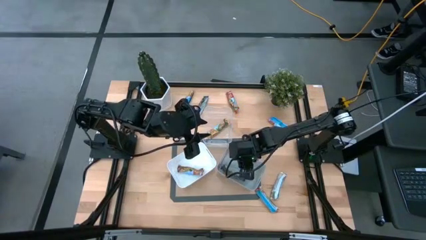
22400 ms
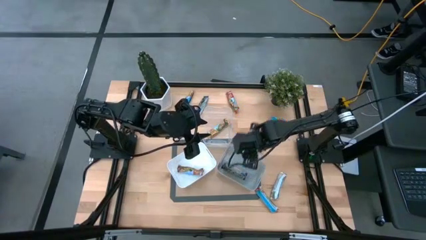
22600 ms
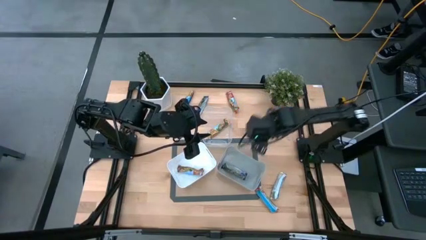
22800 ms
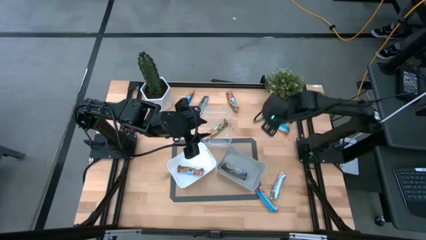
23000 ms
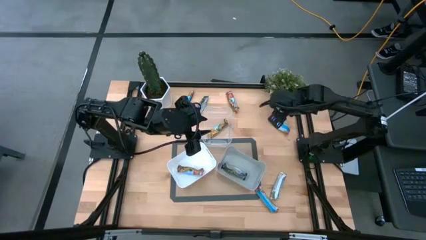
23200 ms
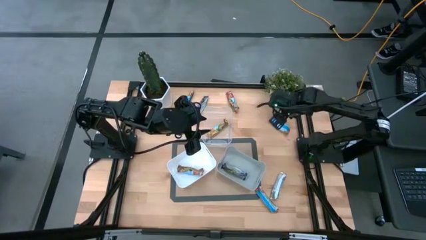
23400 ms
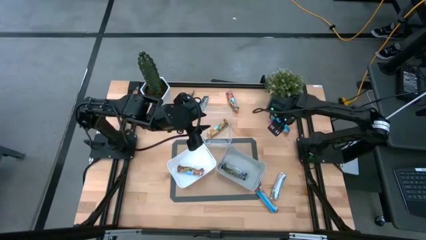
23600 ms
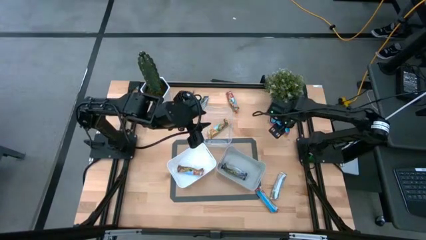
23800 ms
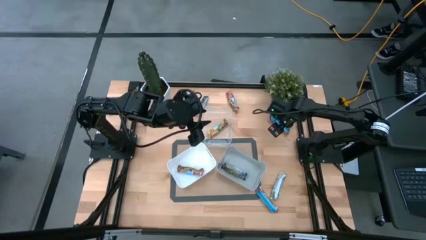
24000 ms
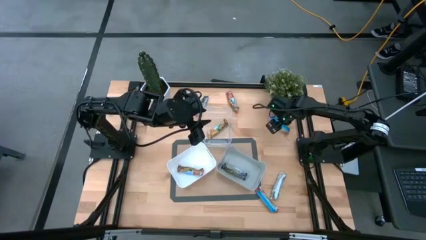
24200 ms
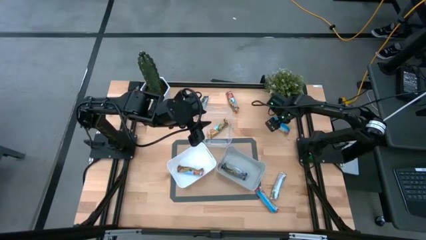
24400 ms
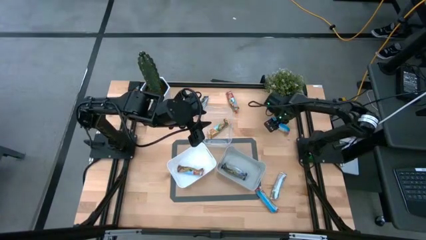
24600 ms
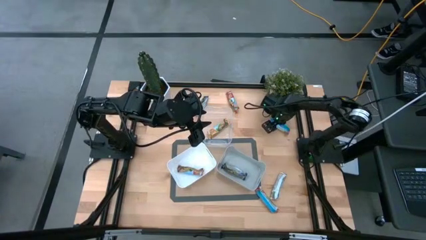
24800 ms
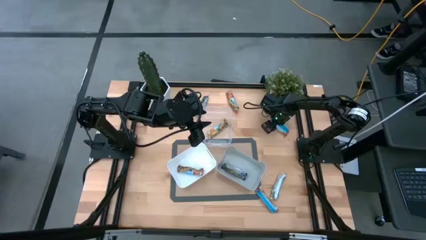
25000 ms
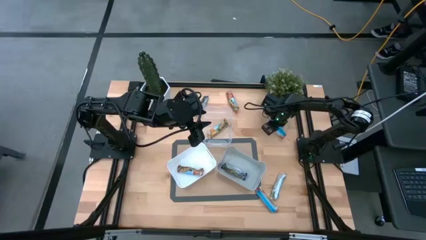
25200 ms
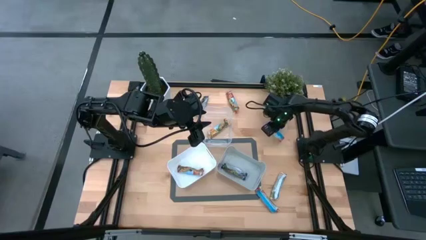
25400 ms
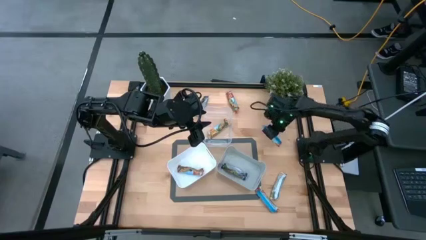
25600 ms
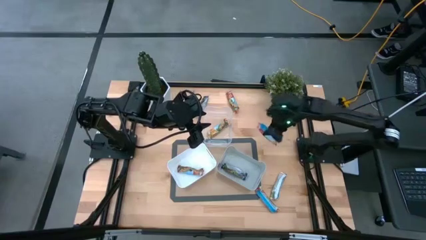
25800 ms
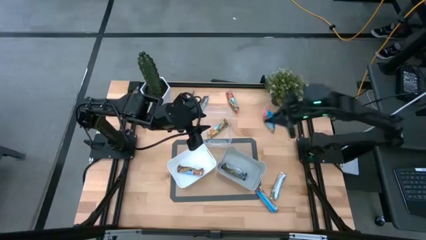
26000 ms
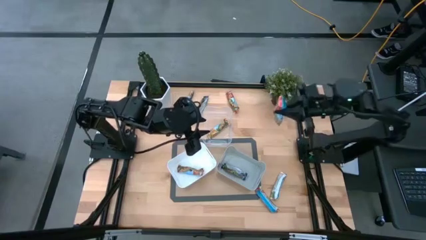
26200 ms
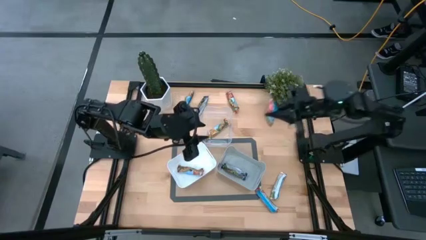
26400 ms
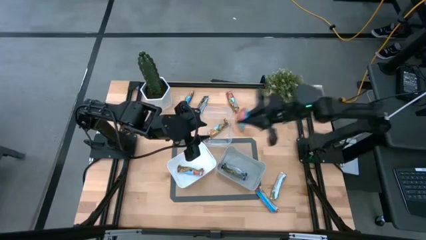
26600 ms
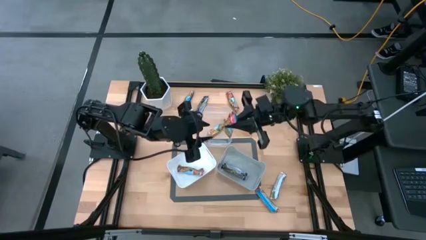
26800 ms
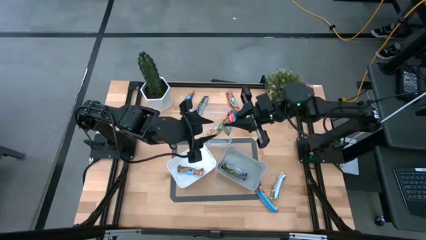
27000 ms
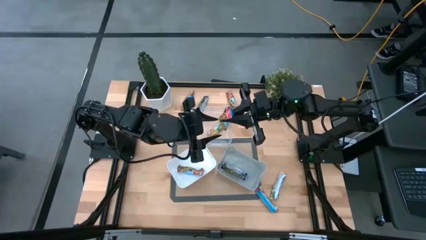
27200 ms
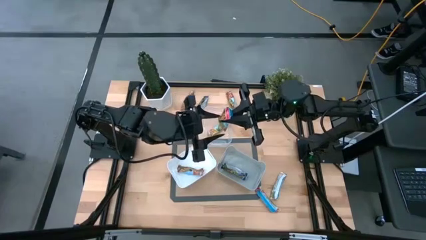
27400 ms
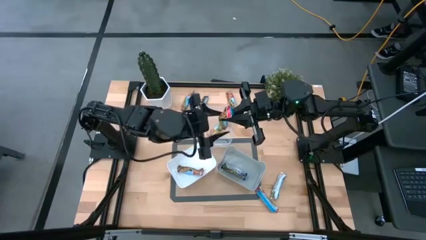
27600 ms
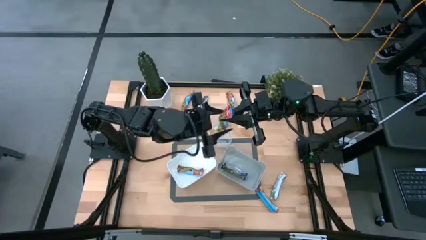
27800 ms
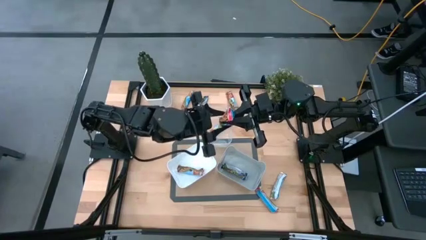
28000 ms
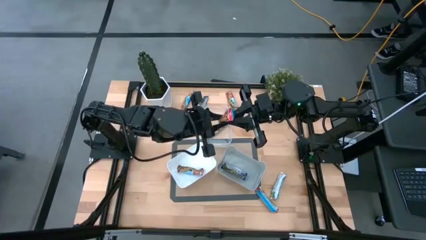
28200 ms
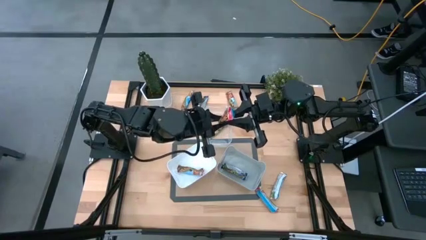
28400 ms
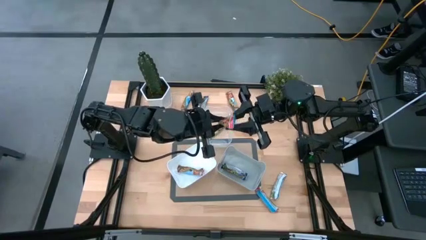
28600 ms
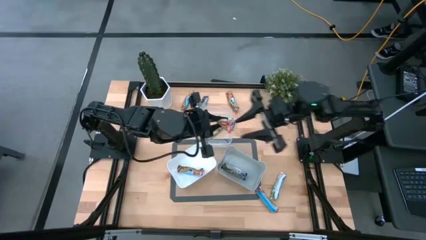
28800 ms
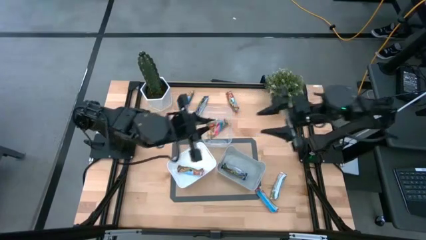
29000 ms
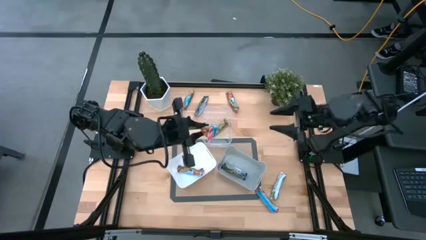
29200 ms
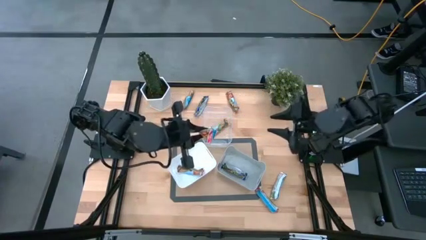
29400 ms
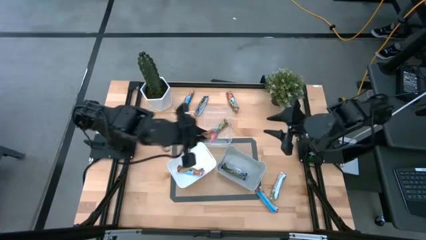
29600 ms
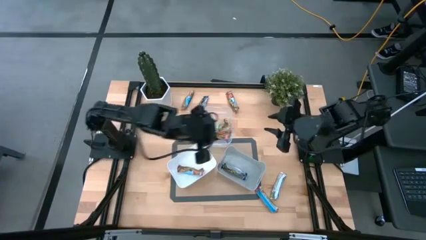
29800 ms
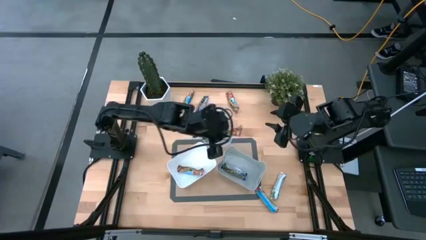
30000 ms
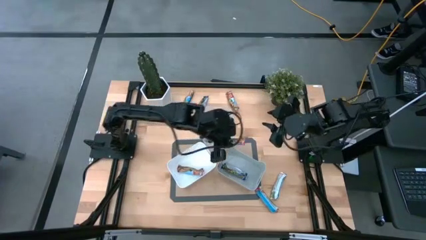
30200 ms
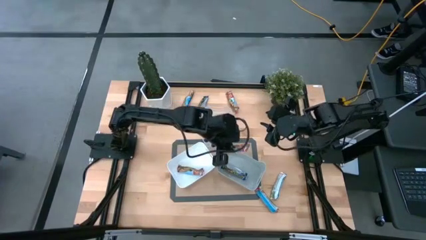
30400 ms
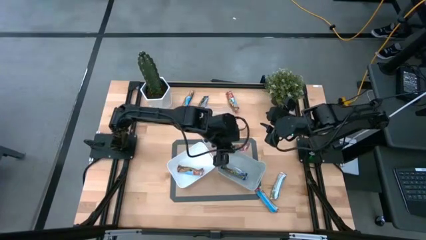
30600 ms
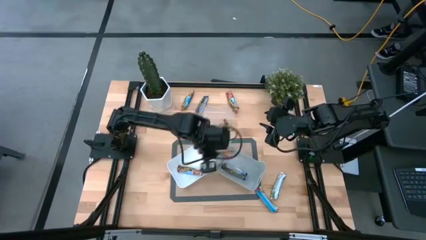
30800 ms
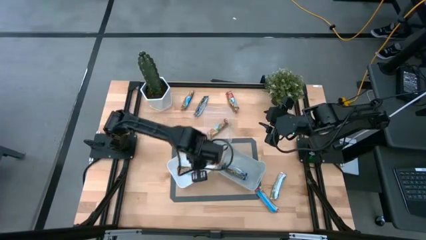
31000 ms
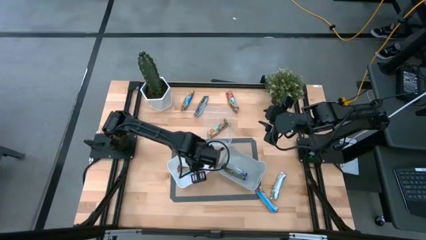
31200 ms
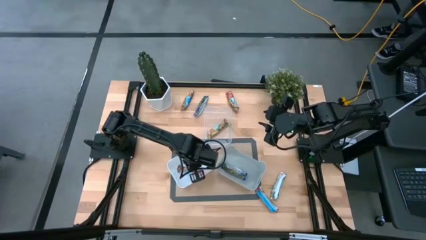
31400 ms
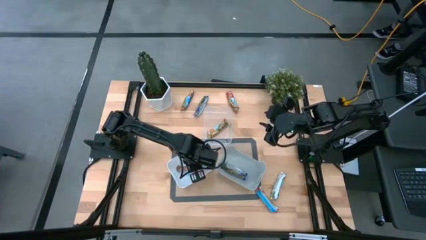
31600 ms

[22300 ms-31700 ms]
Task: Pick and place Granola Bars by type
Put the red granola bar into the white bin

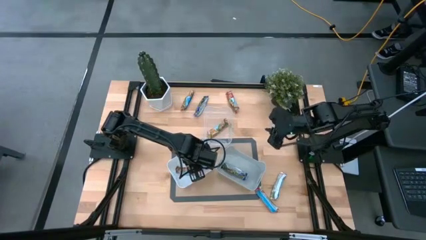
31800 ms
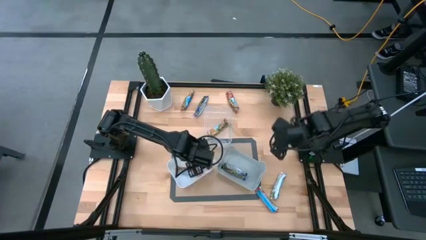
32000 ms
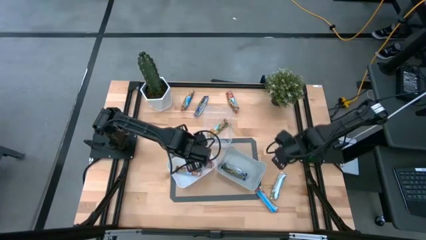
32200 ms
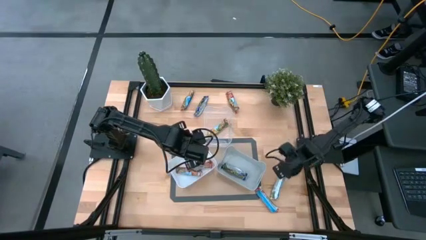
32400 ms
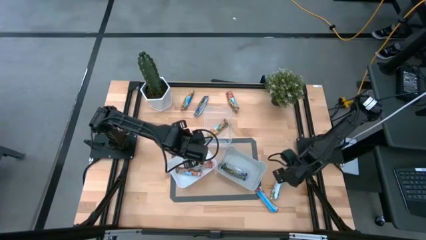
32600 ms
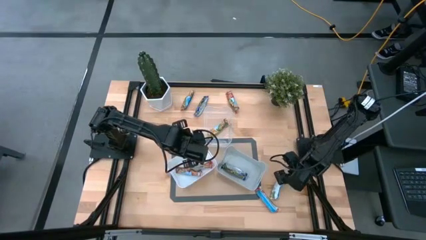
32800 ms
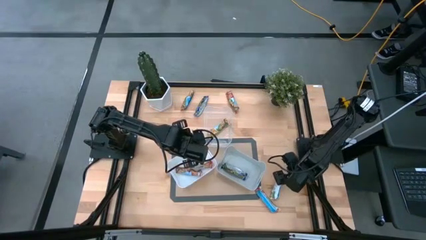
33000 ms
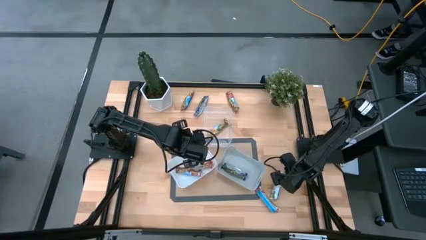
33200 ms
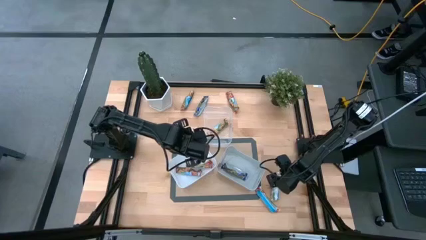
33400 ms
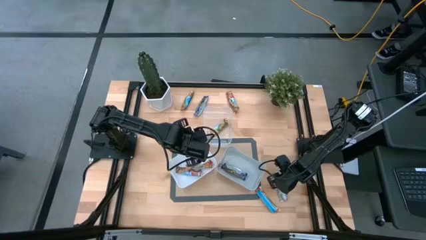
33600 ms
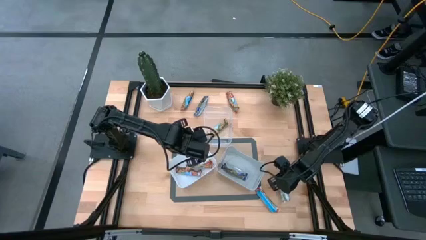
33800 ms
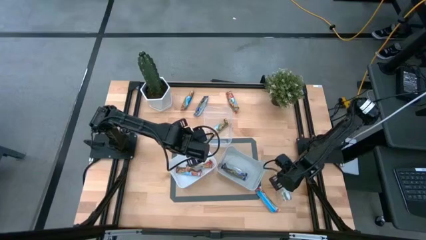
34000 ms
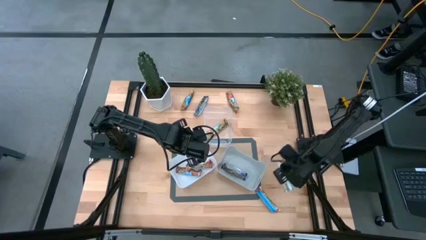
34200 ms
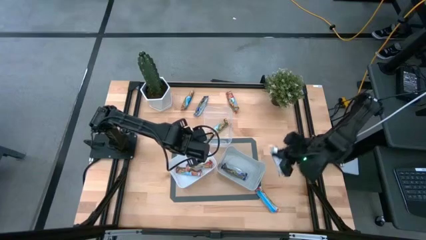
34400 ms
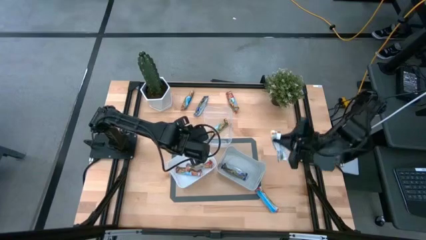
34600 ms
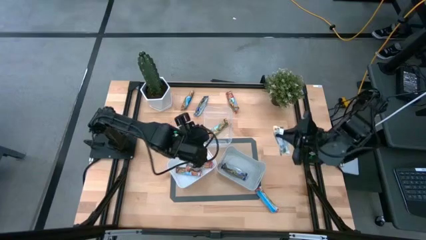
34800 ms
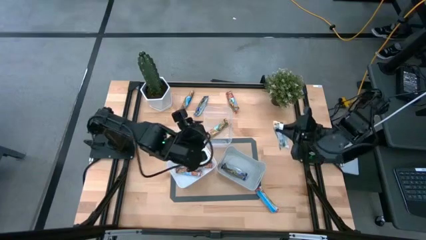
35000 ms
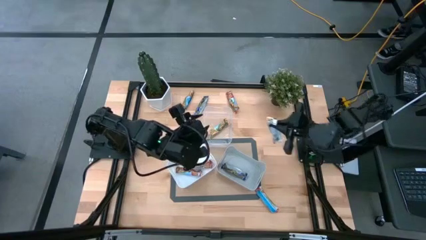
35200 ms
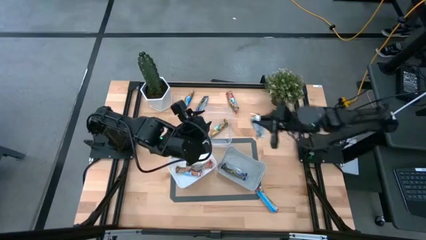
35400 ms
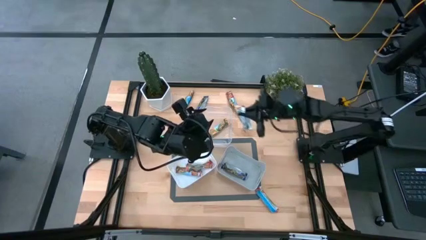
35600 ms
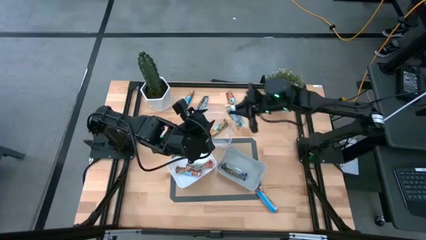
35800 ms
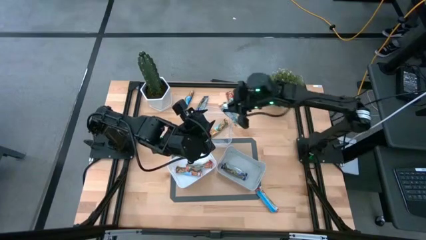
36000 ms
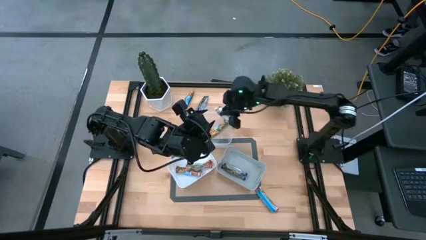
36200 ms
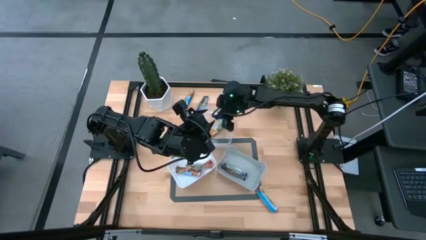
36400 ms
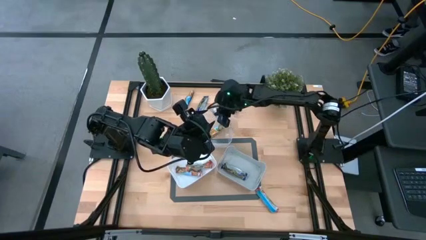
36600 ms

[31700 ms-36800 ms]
Put the yellow granola bar into the transparent bin

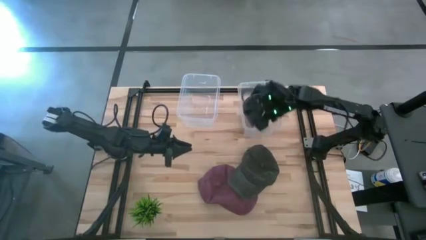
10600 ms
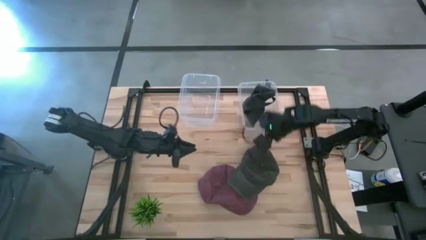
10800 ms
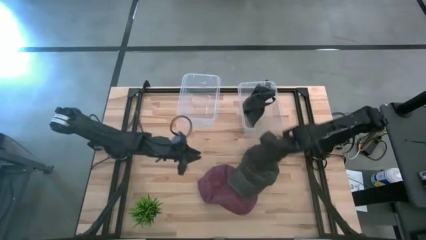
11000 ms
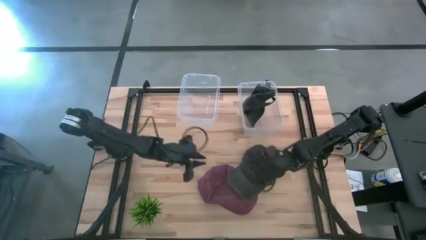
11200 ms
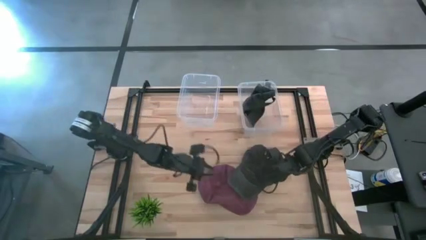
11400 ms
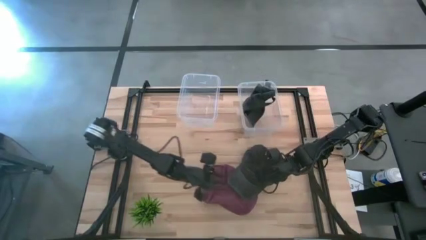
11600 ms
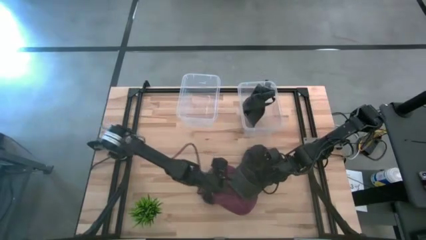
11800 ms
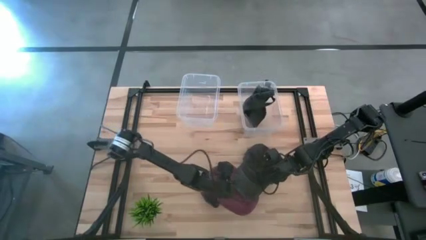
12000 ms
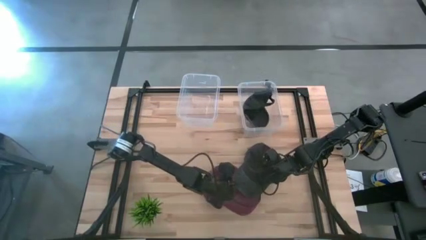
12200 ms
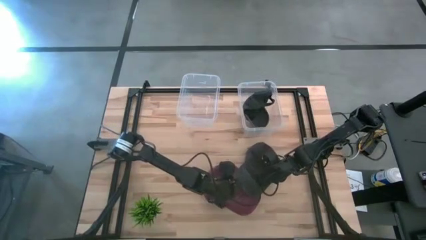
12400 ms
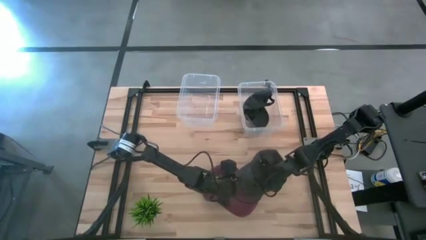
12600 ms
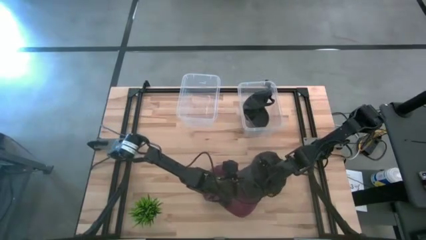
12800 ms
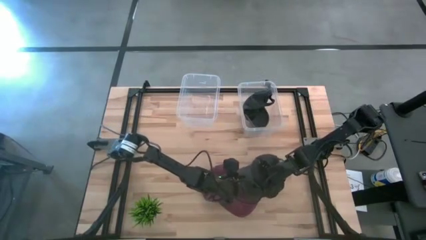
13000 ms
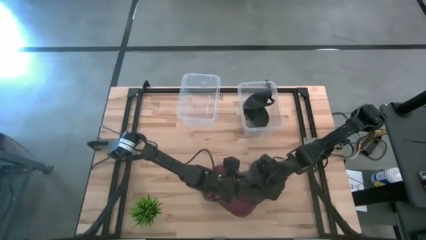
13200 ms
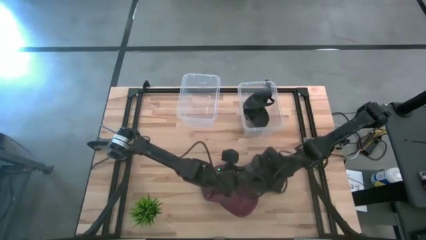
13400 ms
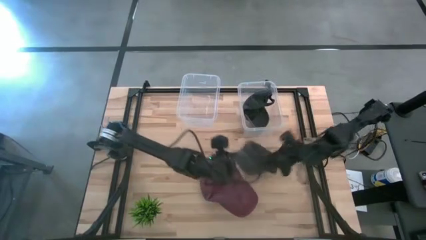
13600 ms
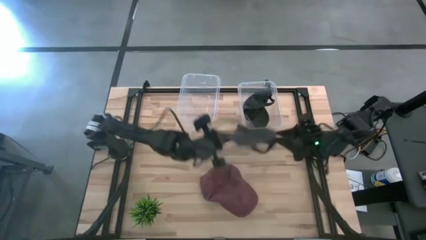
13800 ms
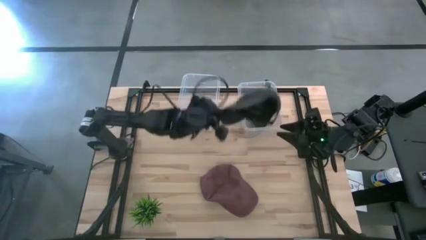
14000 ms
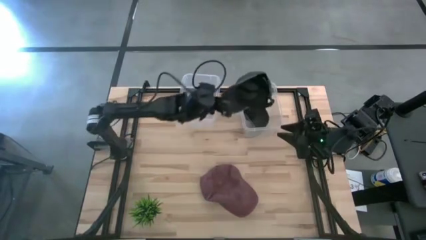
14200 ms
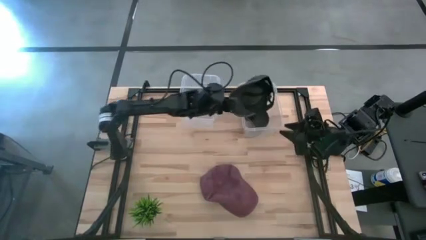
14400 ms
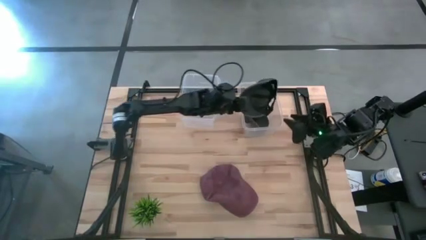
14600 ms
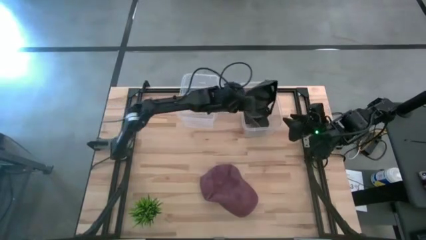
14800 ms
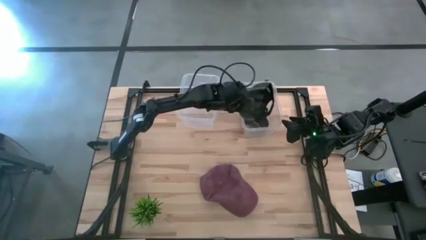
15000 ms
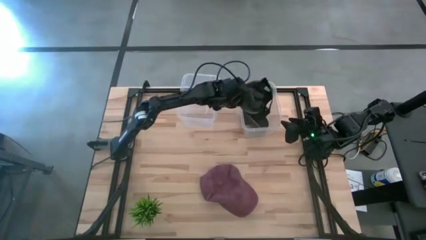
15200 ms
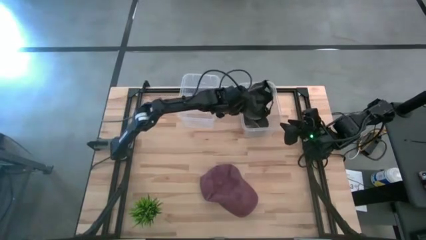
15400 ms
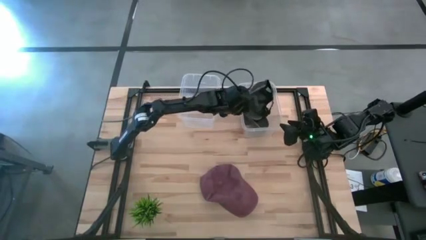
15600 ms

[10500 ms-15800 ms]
Task: Pick & Place hat
Put the black cap into the right transparent bin
